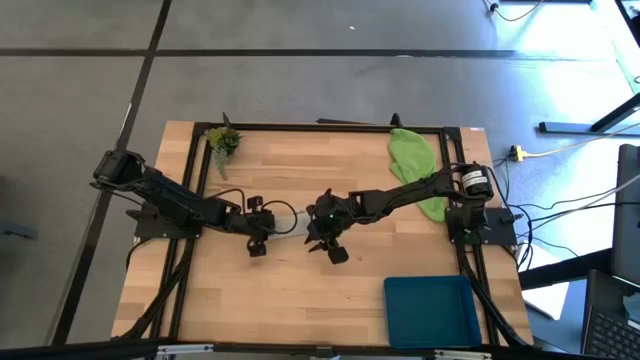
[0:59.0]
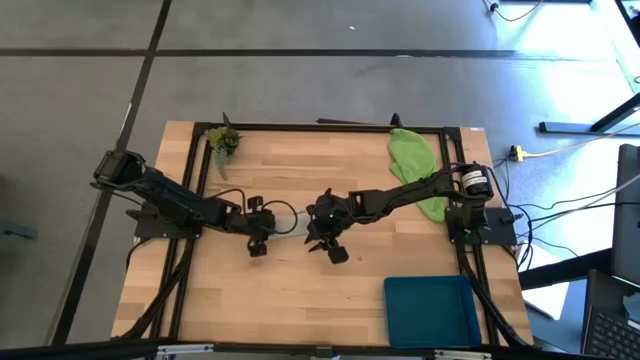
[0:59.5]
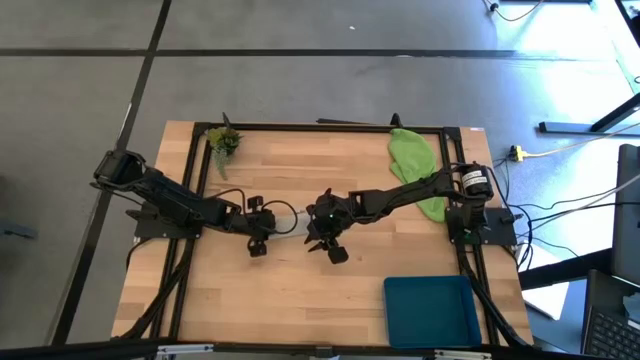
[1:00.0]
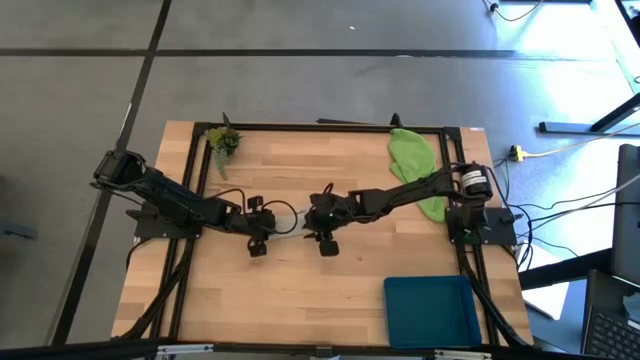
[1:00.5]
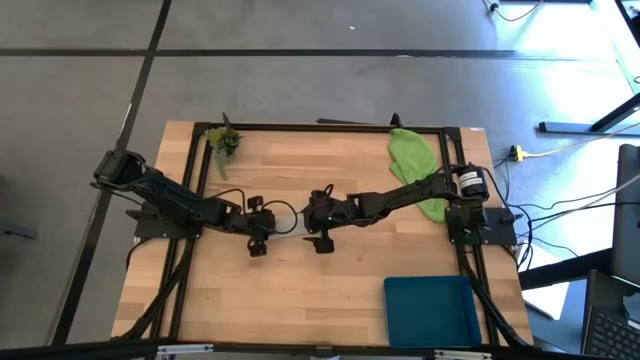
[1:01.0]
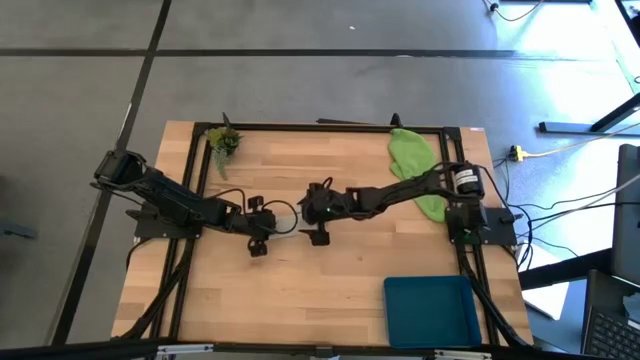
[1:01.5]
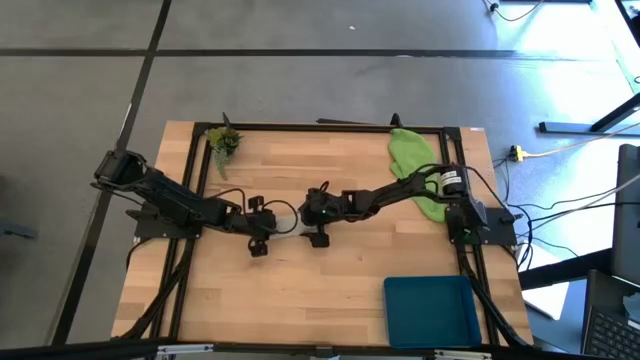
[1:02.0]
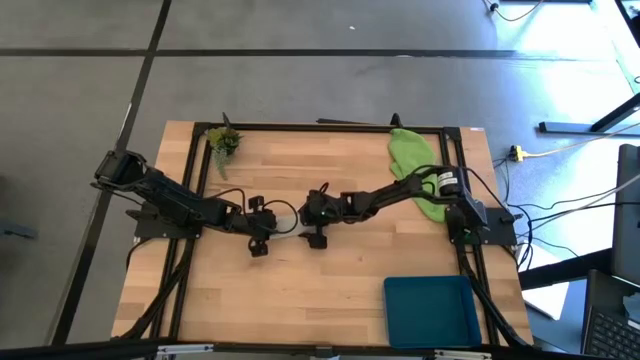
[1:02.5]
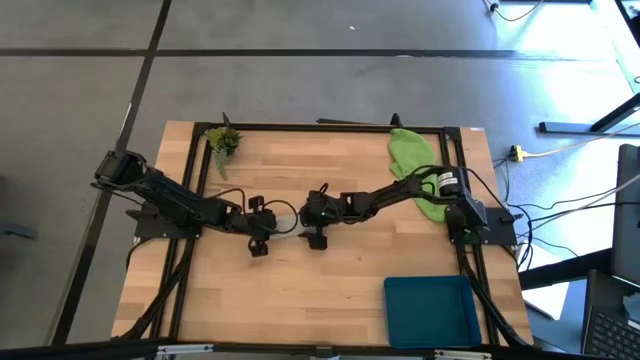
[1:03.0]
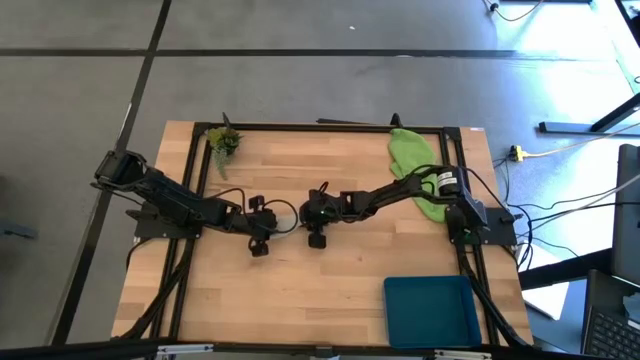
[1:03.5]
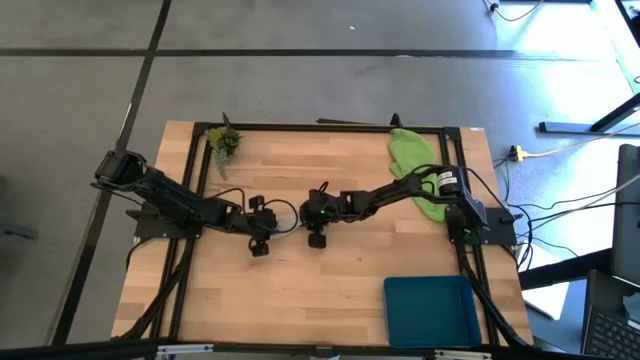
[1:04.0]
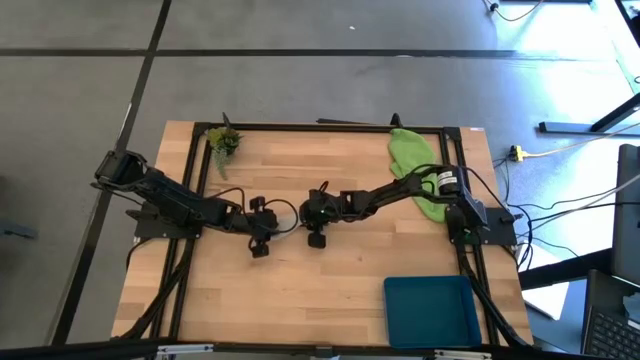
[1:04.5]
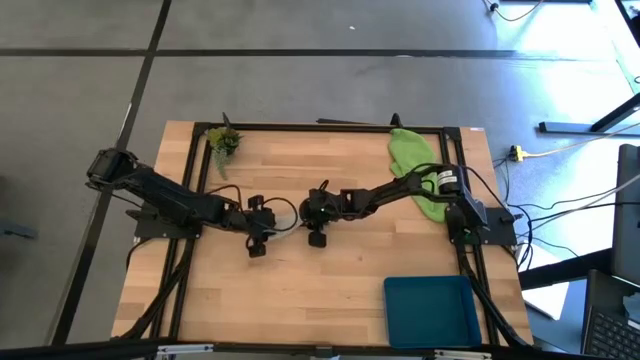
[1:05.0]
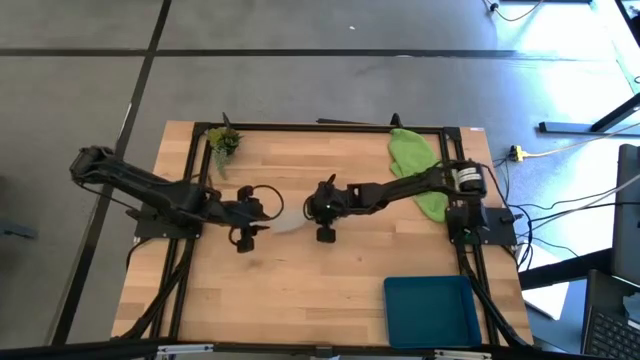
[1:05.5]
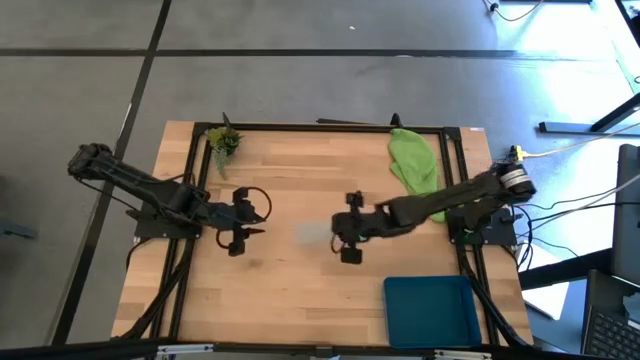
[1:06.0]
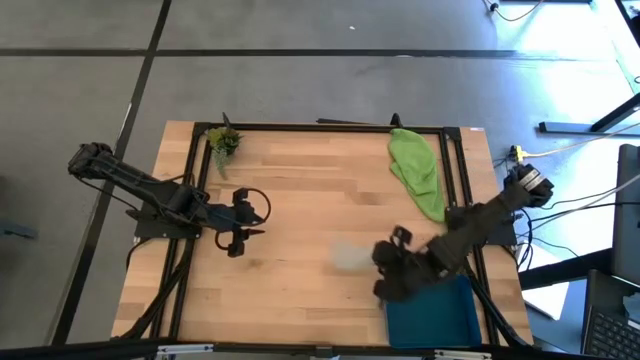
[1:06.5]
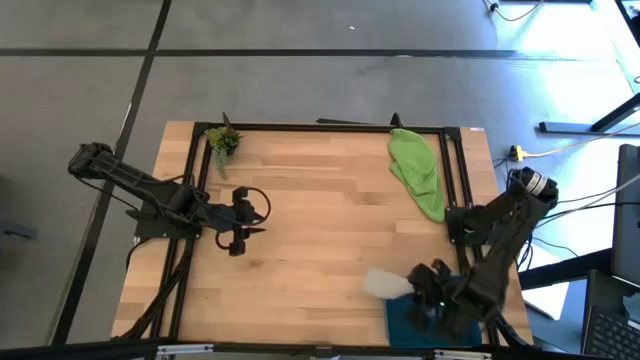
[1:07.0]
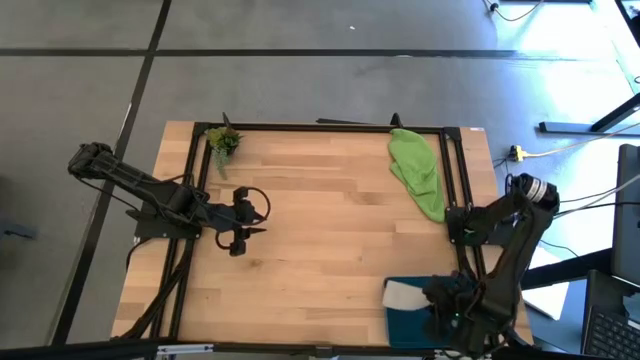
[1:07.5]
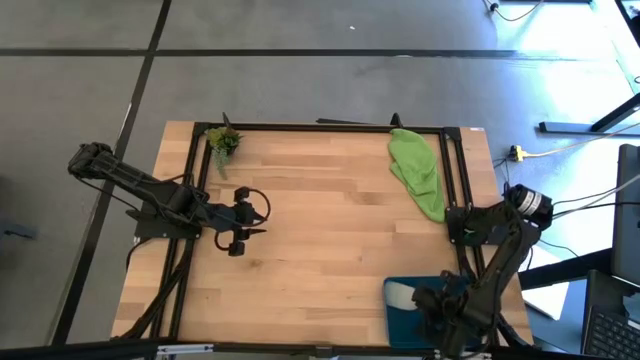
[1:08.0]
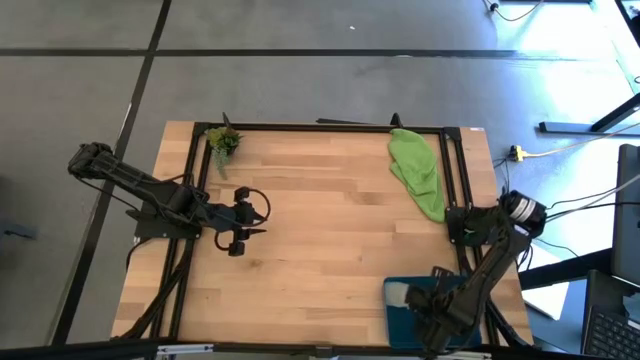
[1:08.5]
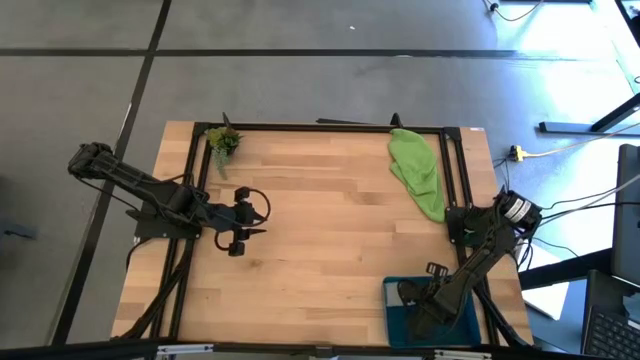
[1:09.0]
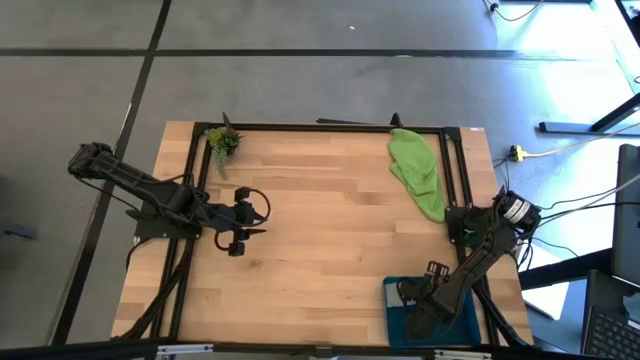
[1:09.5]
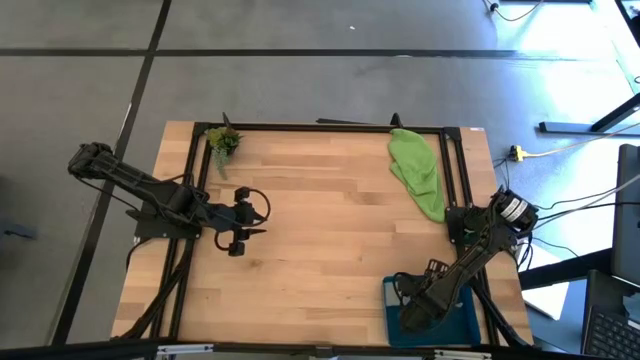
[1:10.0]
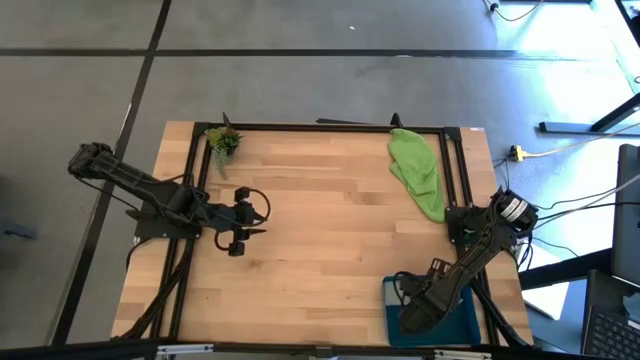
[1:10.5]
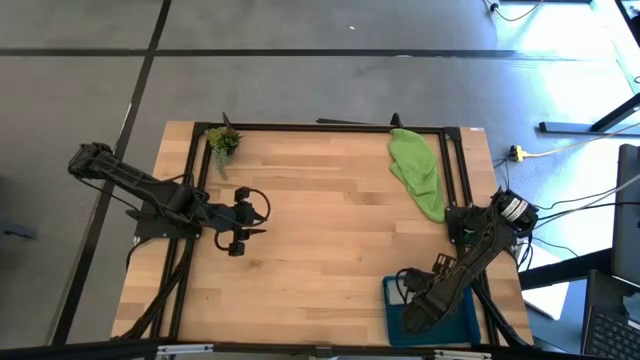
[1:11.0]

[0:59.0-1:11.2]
Task: Roll microfiber towels into tight, uniform cylinder then place into a basket
Put the gray towel into the blue bin

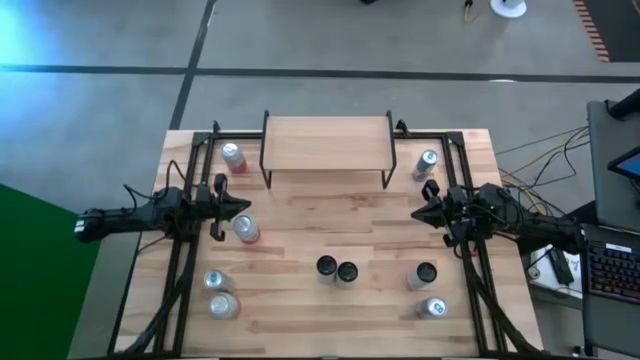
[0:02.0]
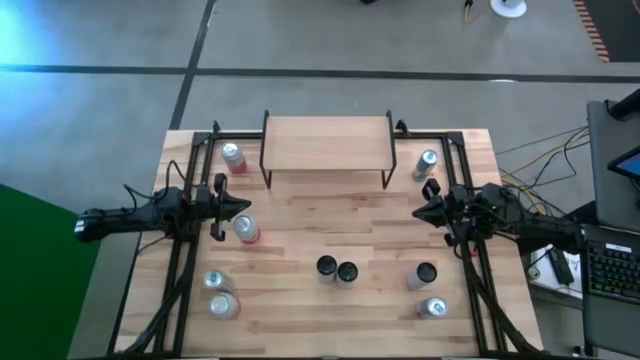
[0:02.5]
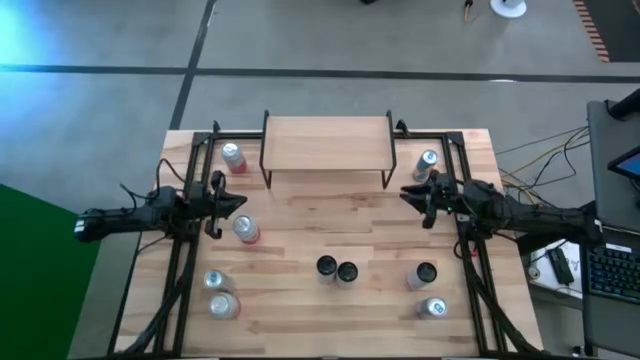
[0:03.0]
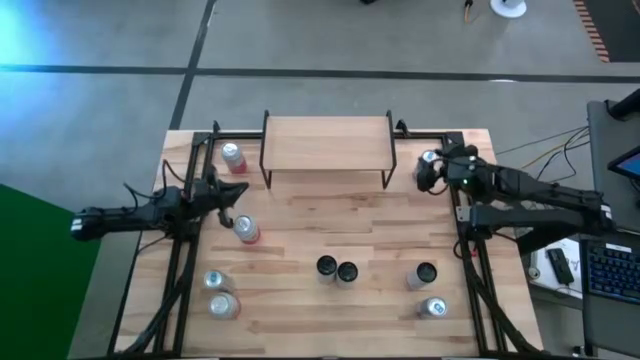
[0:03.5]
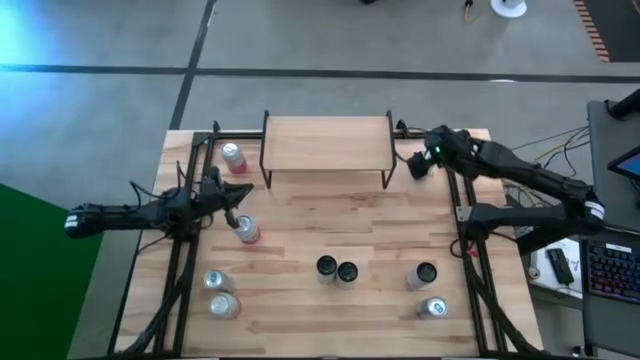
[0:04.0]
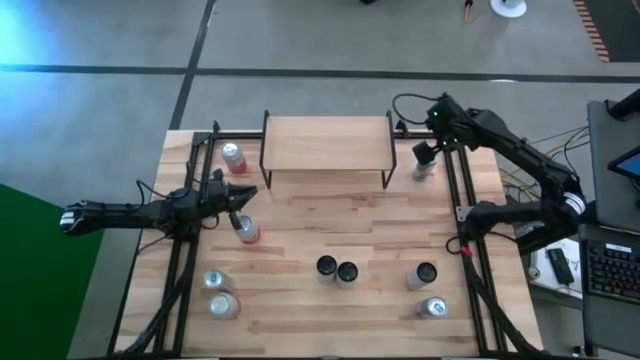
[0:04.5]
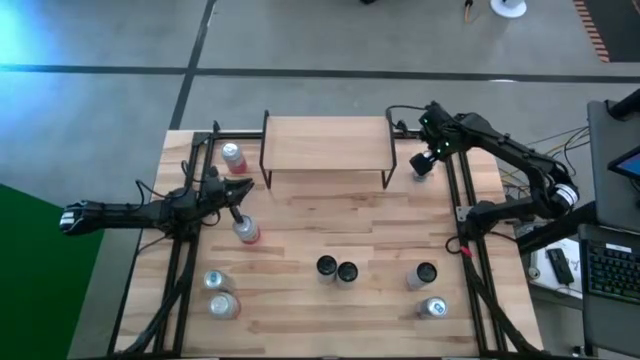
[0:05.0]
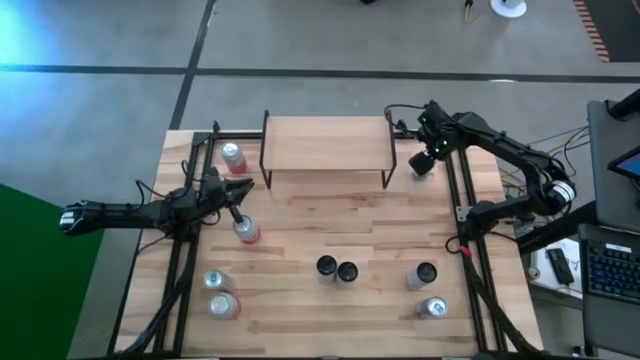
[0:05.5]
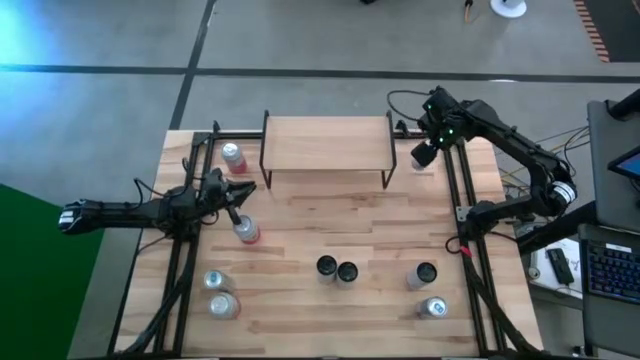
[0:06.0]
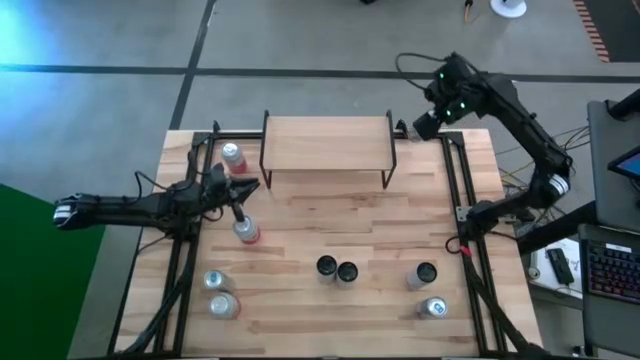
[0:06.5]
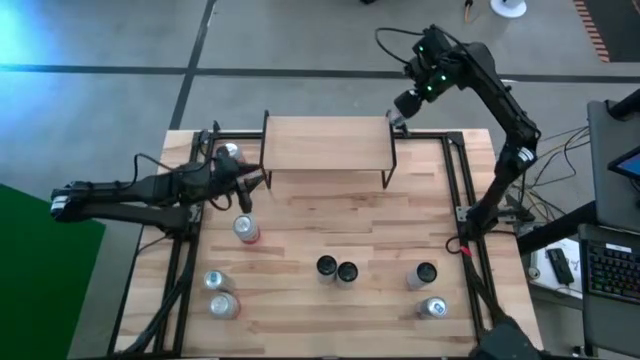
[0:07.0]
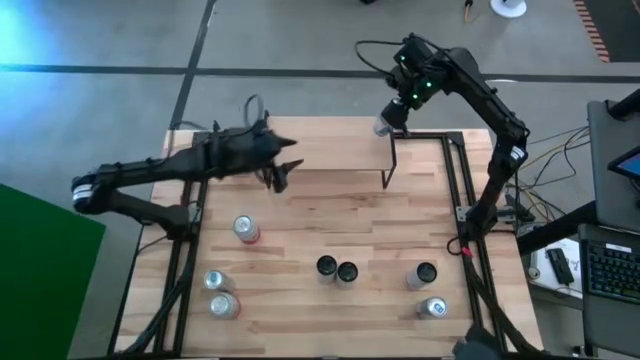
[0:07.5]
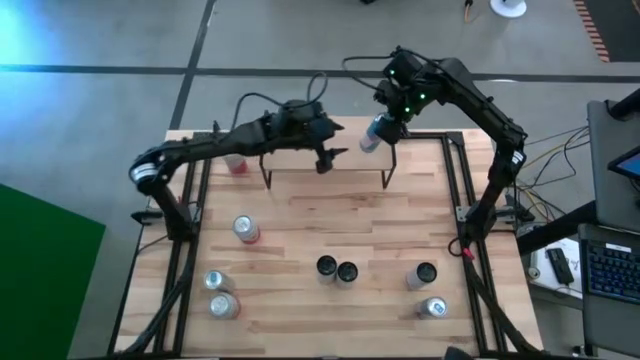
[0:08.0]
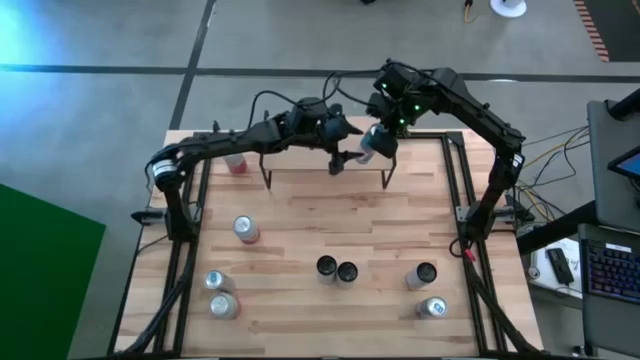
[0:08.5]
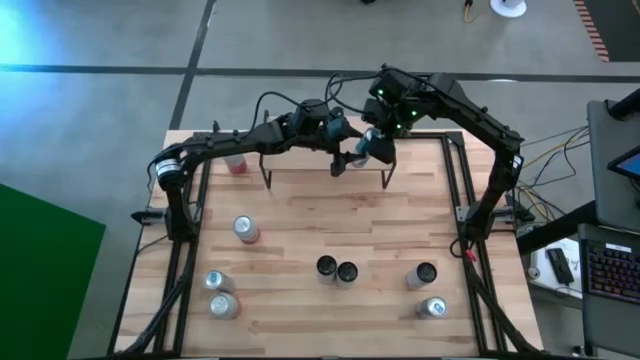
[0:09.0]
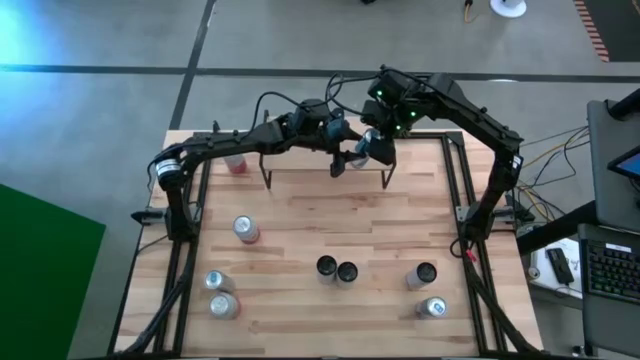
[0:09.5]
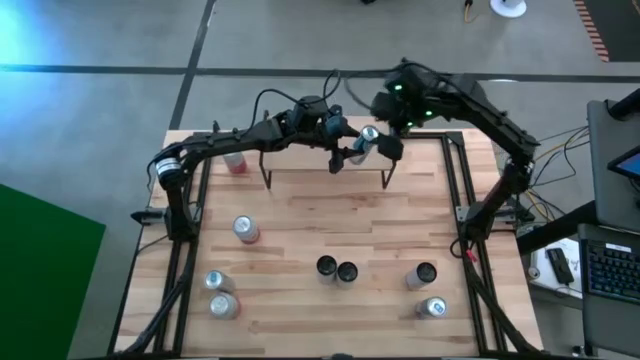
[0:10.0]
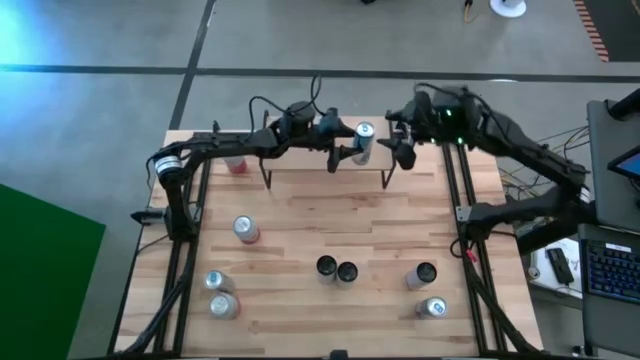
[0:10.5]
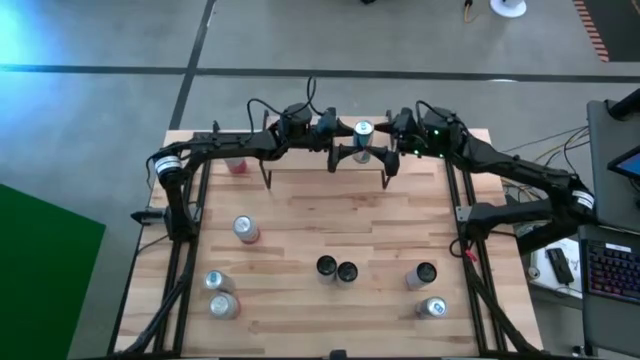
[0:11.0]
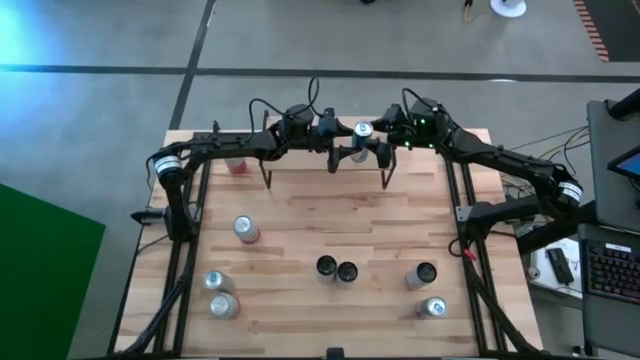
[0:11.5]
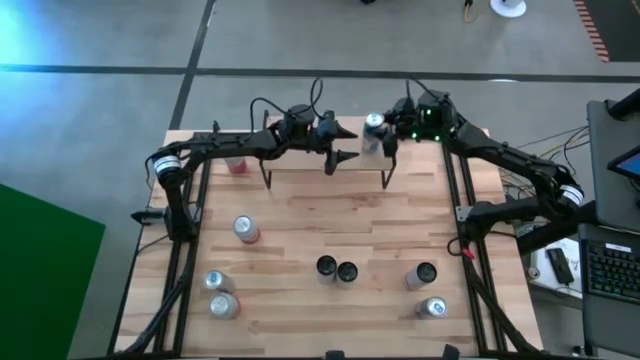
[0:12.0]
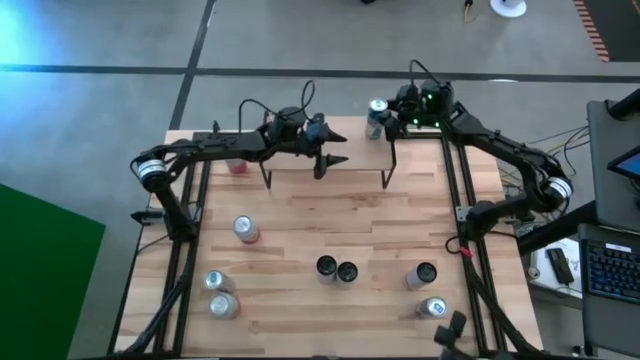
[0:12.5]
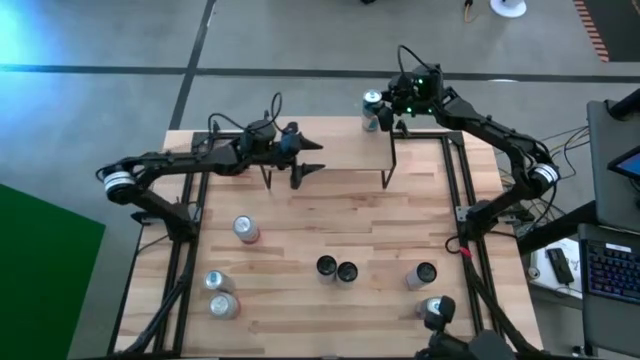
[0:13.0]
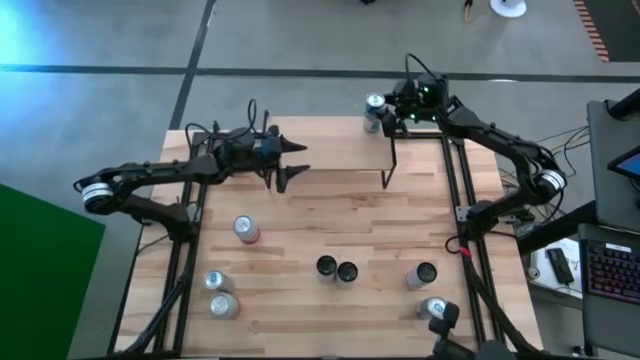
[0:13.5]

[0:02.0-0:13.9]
Task: Place canned beverage on shelf
Put the top right blue soda can on the shelf
